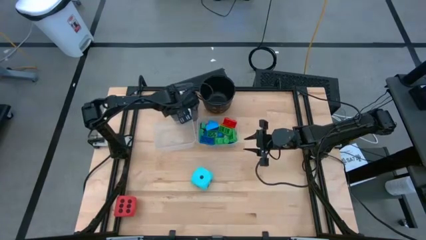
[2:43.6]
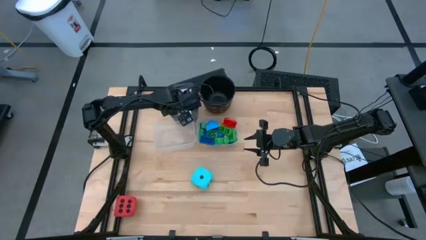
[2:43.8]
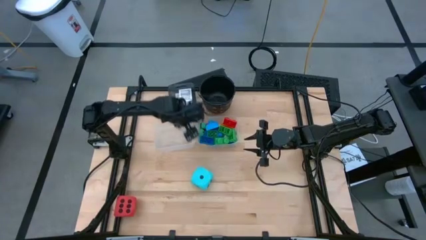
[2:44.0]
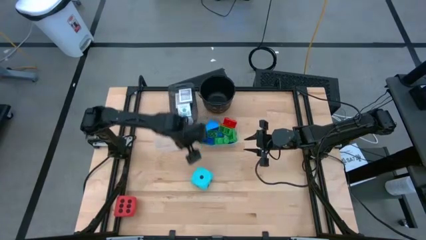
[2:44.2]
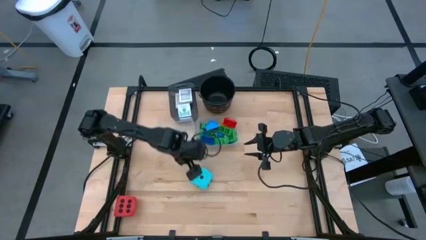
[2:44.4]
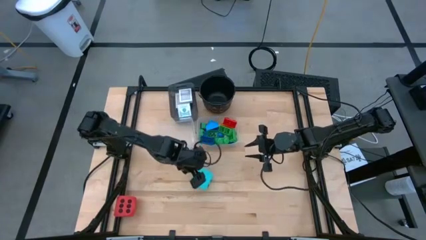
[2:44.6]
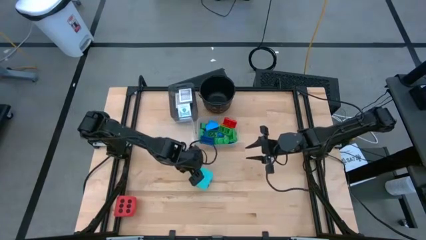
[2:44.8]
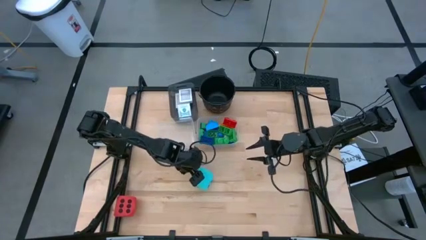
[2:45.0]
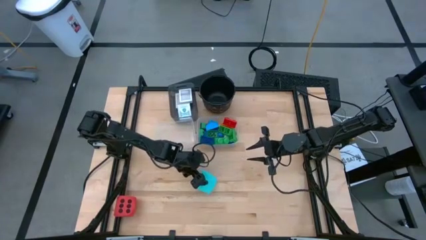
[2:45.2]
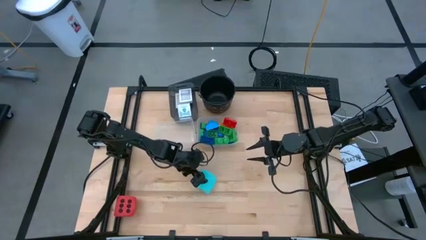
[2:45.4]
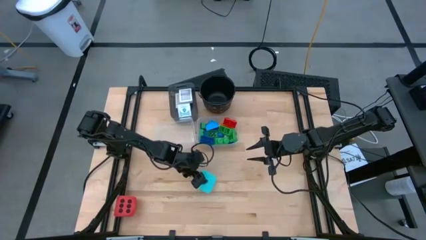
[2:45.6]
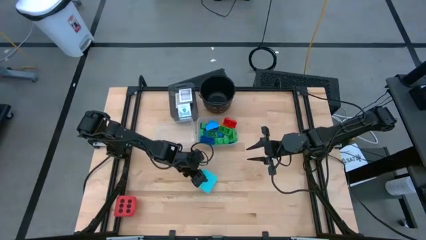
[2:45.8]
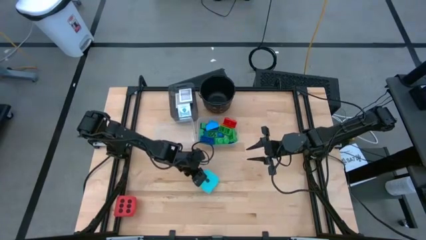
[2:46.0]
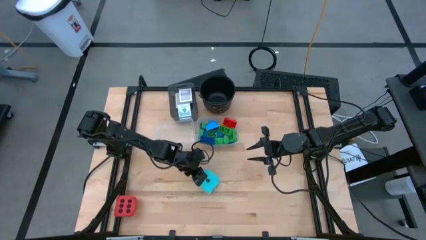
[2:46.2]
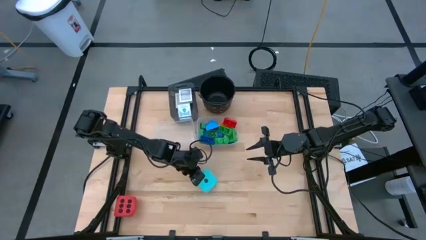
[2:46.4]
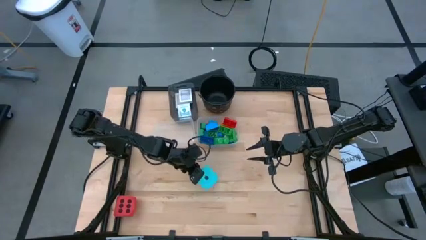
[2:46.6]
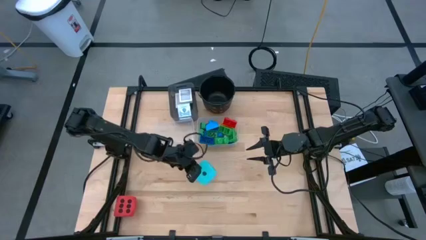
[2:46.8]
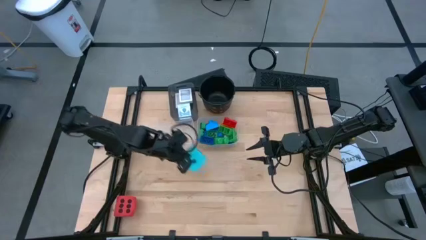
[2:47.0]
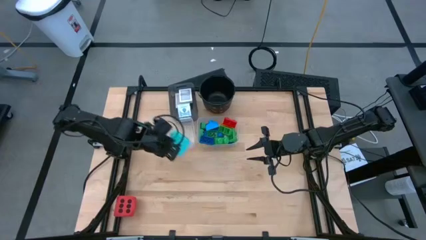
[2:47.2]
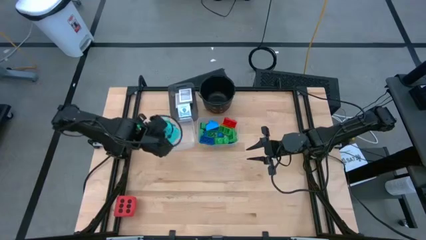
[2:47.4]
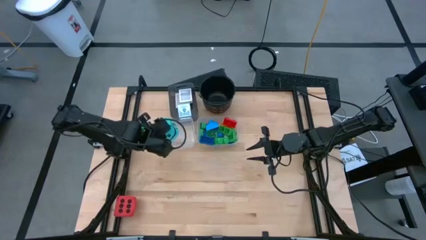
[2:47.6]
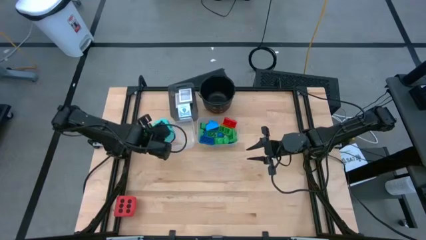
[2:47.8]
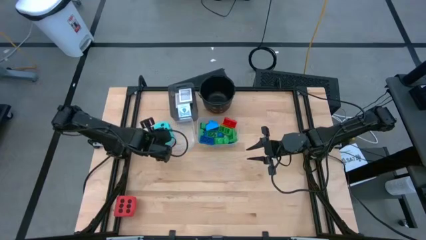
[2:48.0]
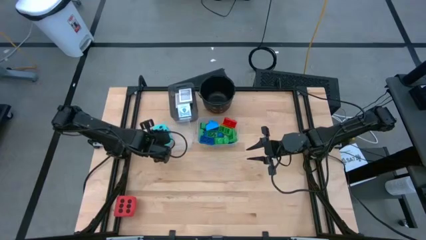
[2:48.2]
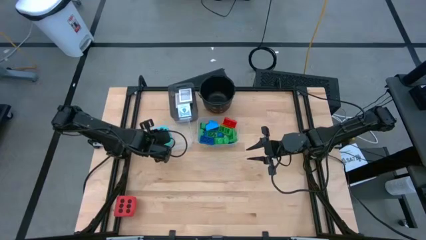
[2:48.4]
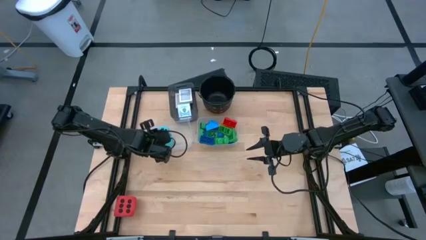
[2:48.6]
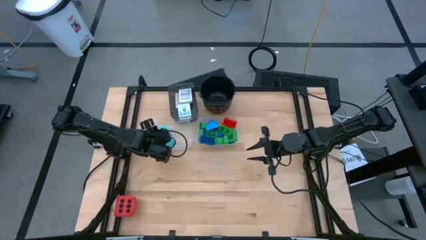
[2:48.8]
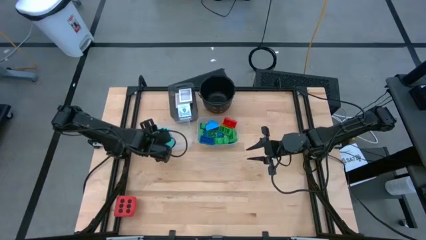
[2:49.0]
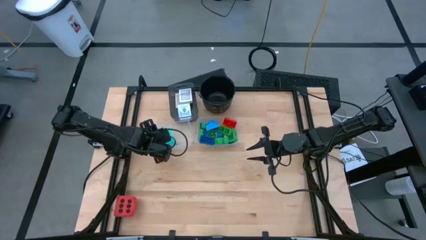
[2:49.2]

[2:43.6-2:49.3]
Task: Pick & Place Toys
Put the blue dice into the left transparent bin

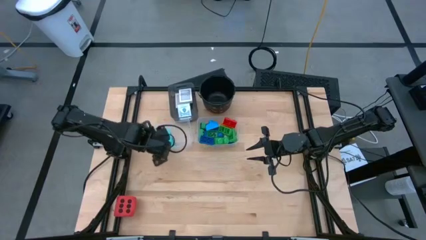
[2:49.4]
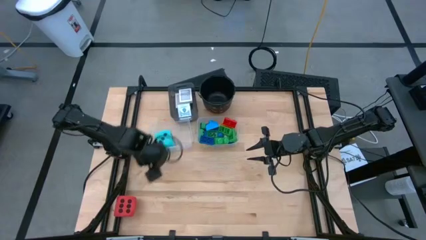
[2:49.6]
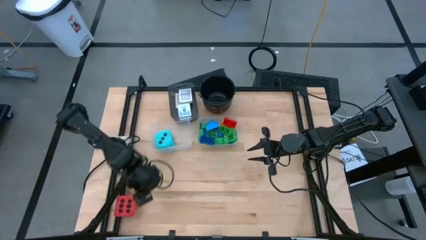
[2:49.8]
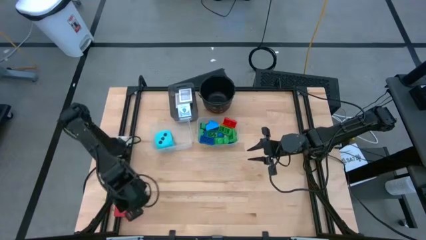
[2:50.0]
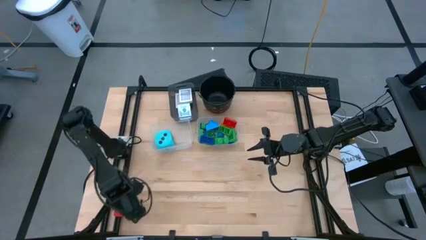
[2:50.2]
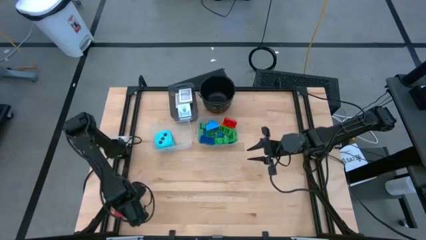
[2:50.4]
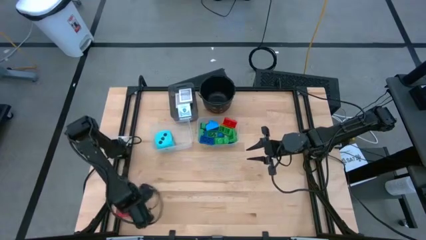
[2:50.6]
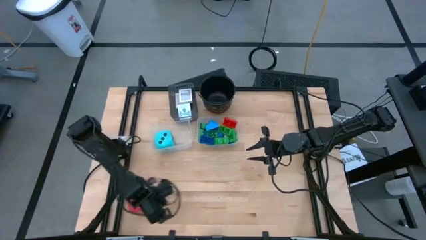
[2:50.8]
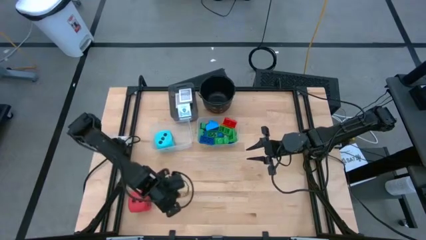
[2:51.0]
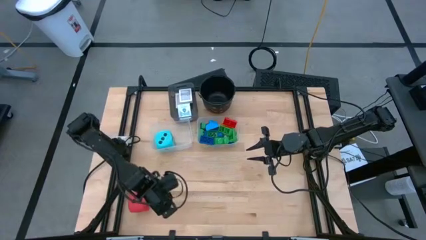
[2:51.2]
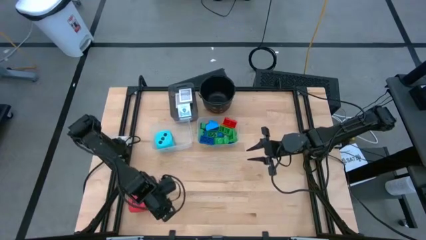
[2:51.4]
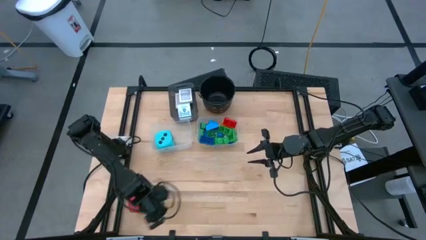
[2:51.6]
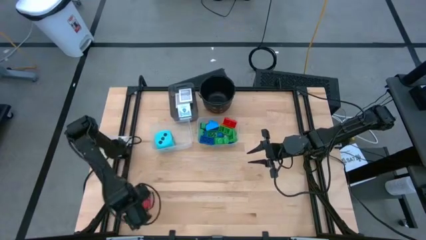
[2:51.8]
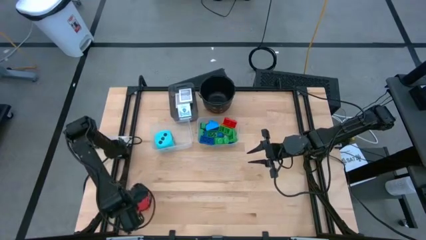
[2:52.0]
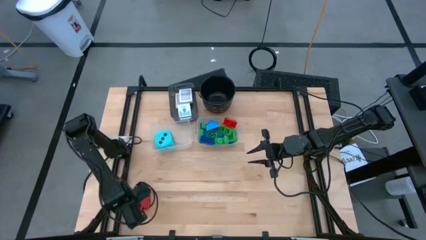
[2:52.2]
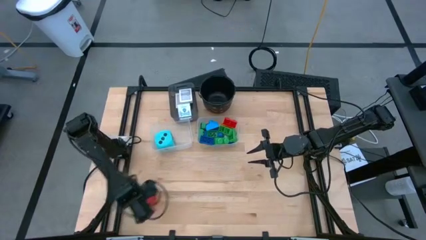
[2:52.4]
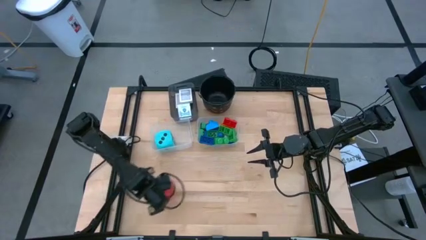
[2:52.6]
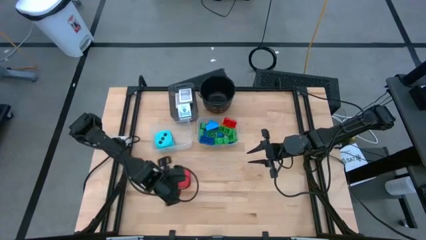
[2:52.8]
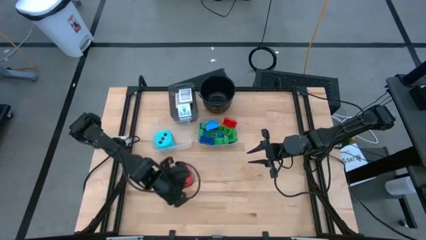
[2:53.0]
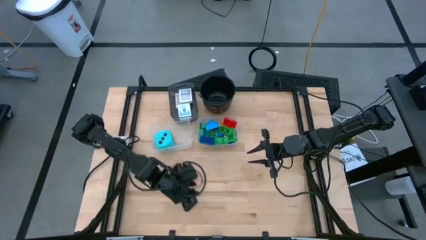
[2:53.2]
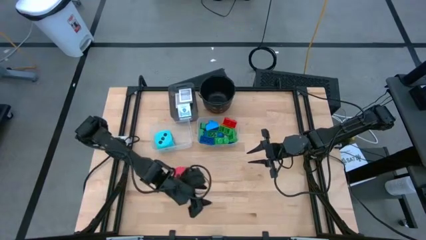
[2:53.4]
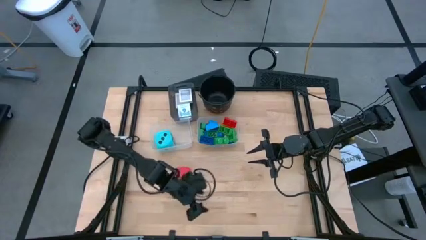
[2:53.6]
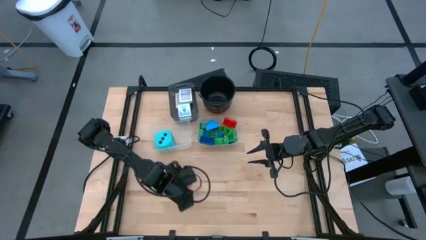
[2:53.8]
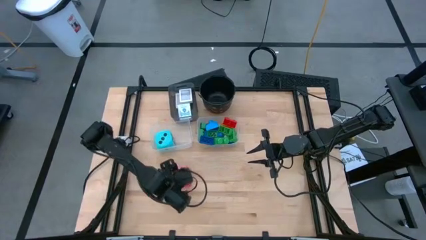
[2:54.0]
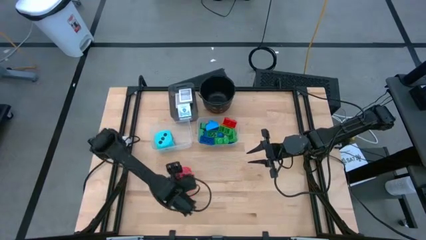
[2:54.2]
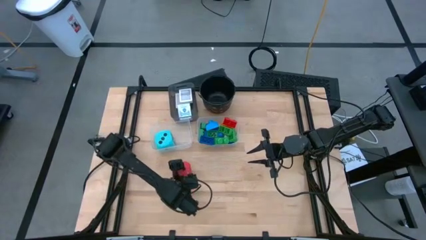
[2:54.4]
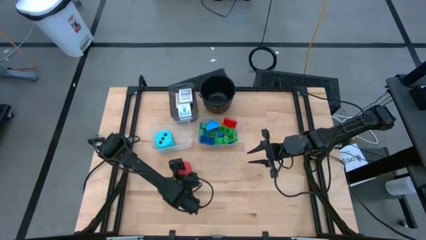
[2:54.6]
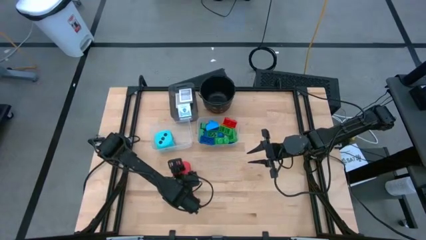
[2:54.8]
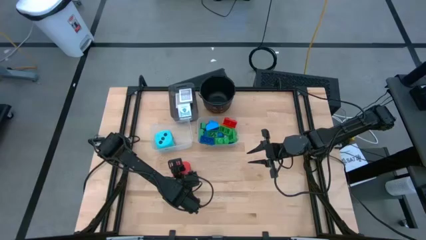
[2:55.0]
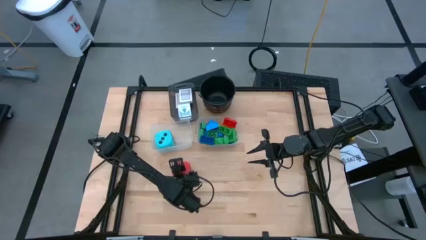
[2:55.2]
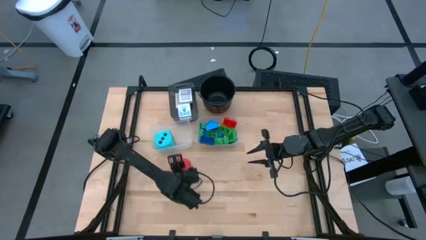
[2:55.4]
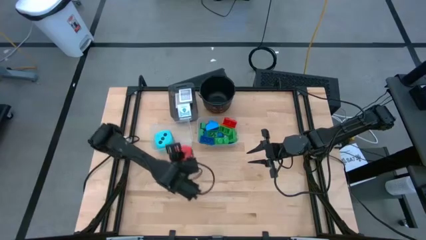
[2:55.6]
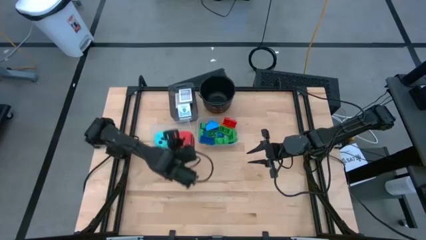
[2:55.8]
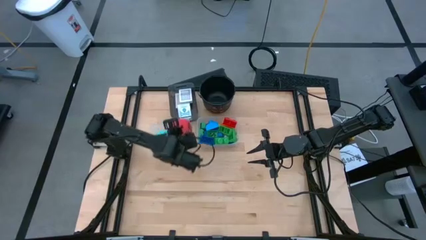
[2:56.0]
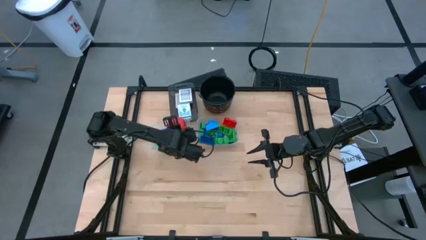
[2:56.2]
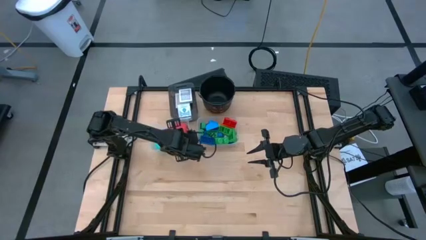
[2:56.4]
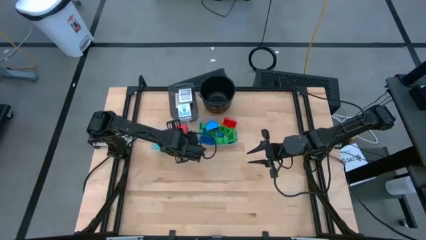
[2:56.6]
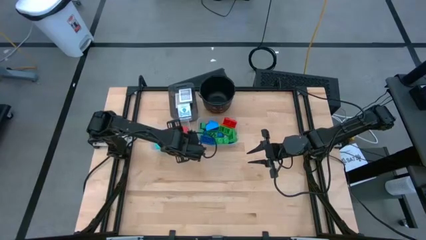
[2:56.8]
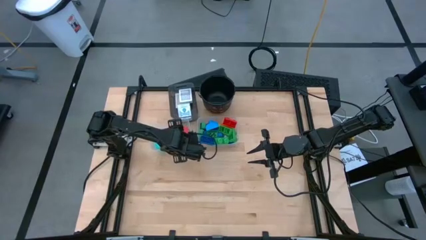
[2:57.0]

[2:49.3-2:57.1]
Put the red dice into the left transparent bin

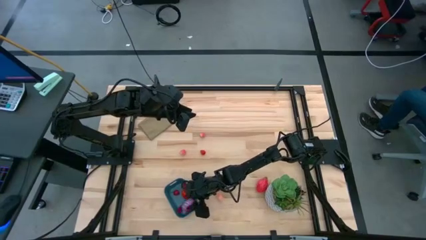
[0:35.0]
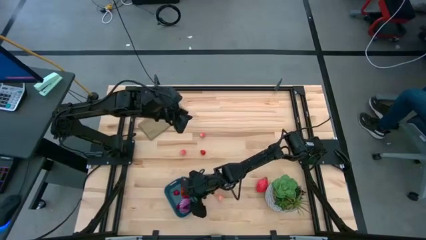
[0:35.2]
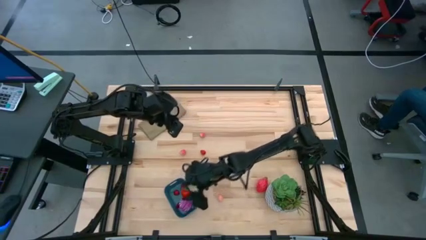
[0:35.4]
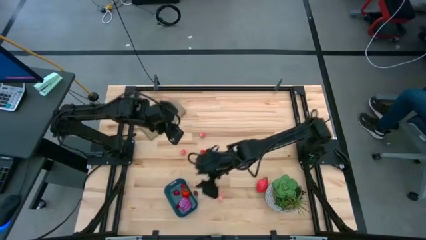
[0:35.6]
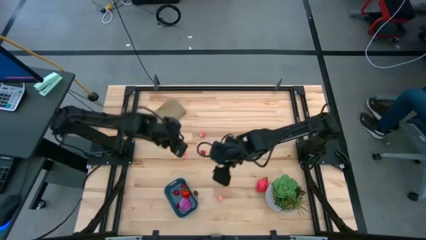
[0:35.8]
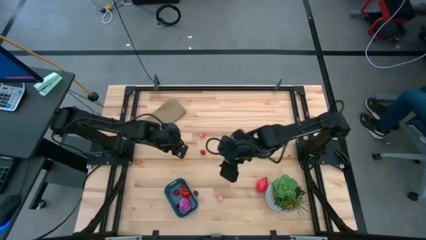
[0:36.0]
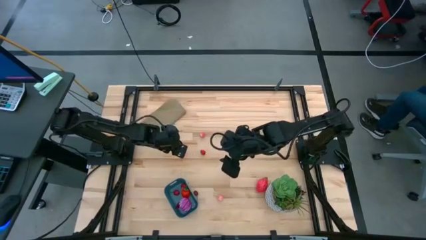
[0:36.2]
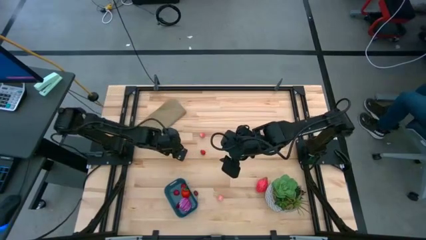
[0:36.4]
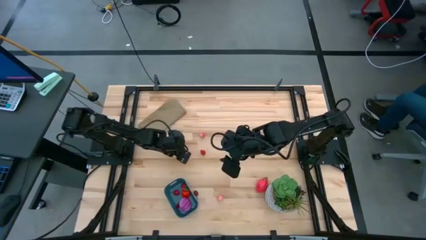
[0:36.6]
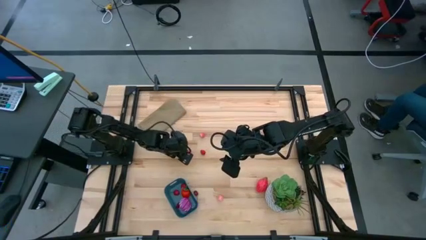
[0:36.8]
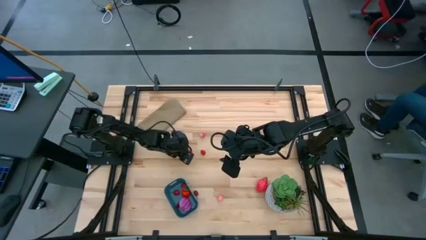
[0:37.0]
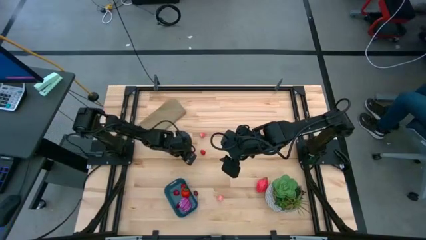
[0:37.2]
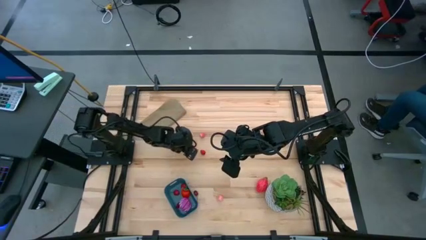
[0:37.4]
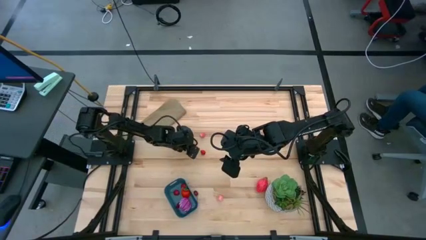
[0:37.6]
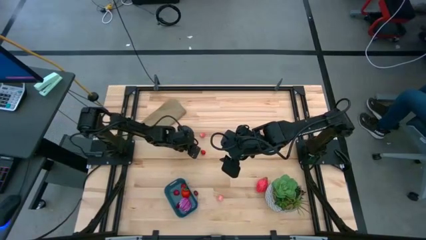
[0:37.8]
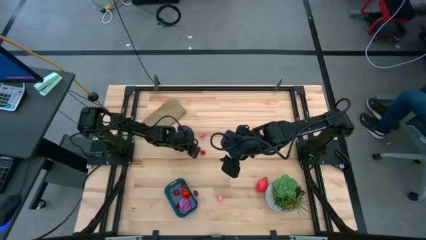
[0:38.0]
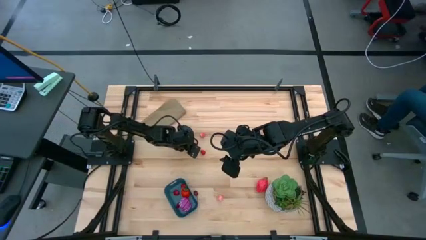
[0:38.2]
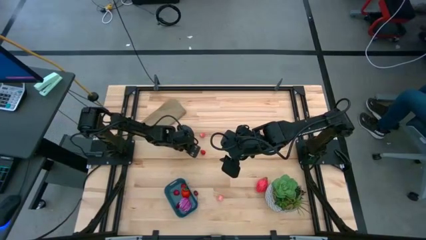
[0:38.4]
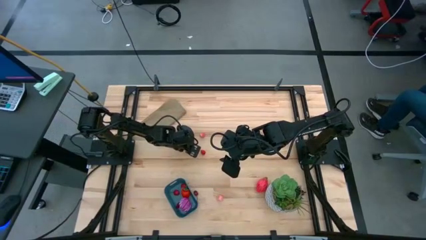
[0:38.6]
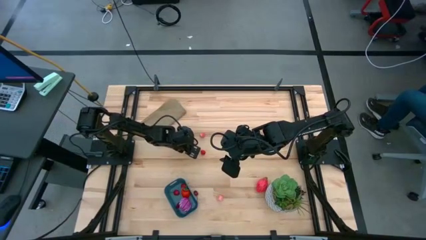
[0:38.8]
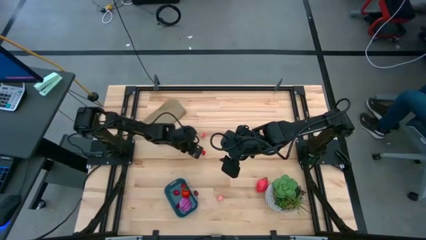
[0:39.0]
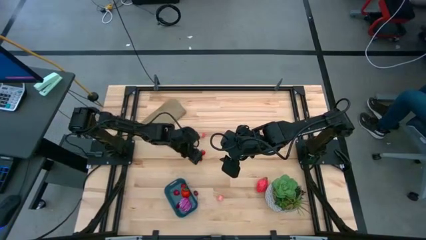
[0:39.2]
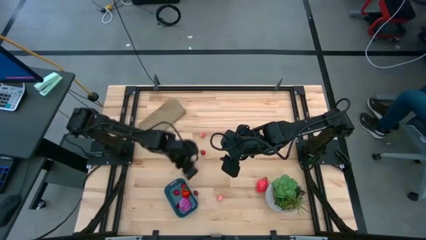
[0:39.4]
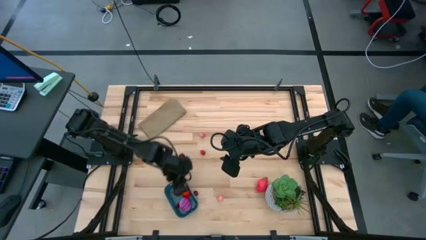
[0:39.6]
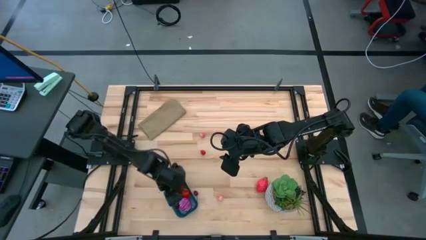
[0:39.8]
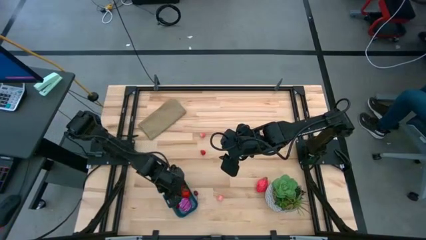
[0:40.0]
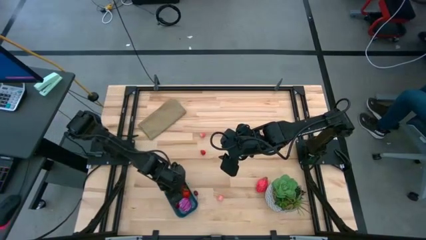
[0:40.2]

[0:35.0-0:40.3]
Task: Pick and placing Produce into tupperware
Put the pink peach into the blue bin
